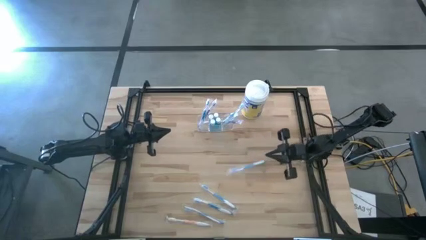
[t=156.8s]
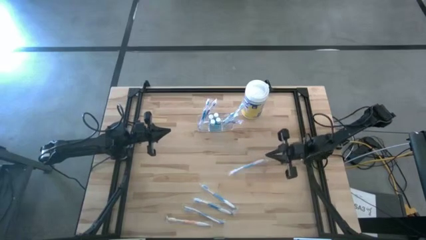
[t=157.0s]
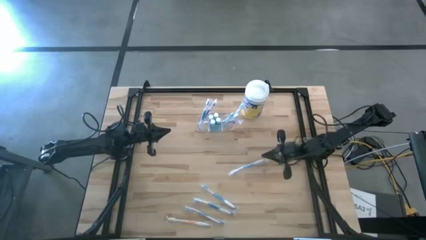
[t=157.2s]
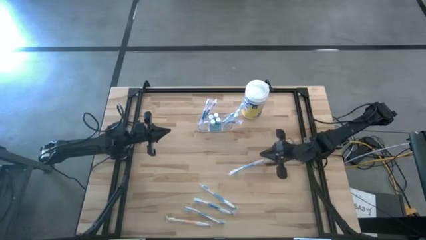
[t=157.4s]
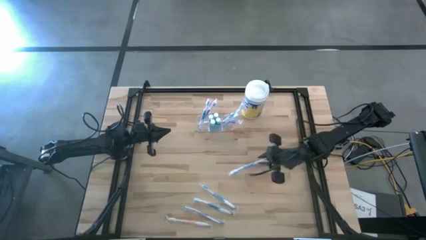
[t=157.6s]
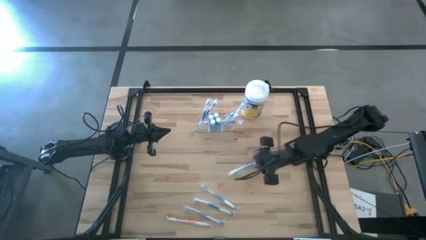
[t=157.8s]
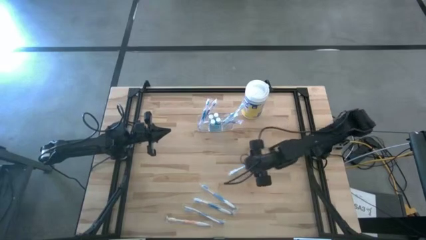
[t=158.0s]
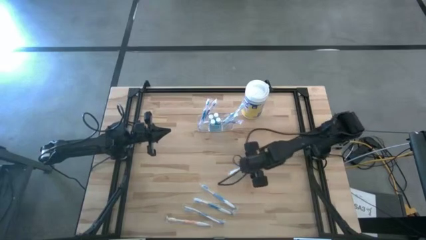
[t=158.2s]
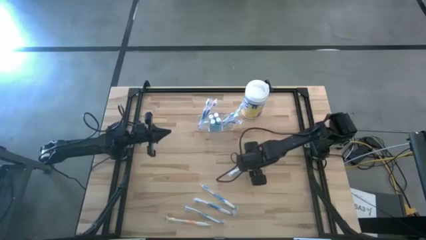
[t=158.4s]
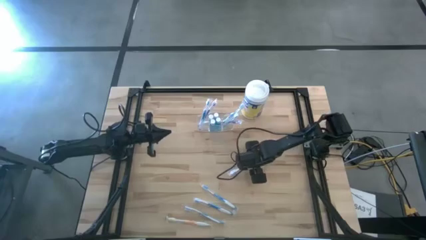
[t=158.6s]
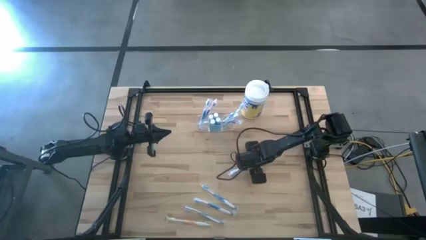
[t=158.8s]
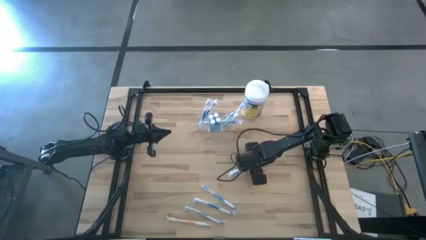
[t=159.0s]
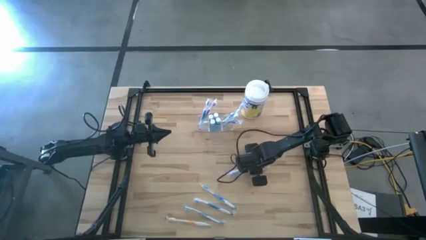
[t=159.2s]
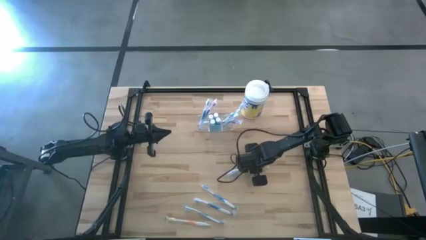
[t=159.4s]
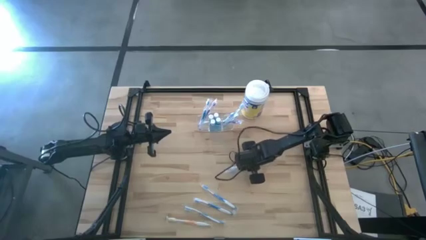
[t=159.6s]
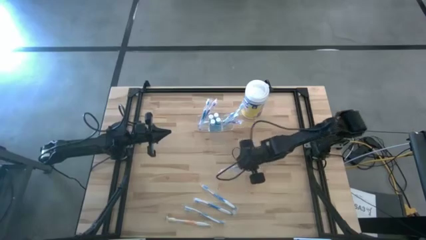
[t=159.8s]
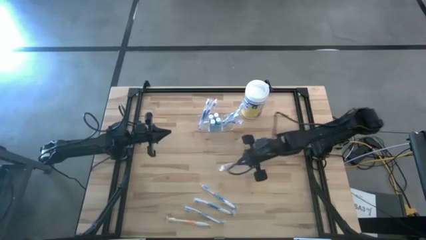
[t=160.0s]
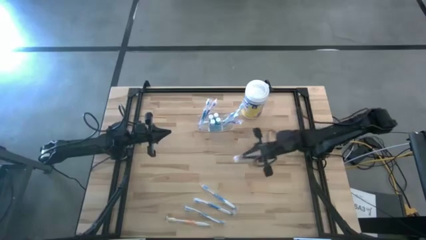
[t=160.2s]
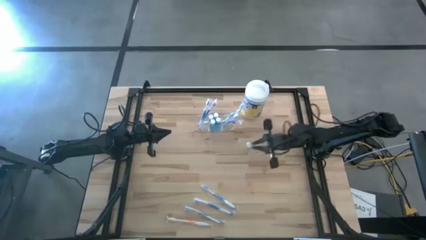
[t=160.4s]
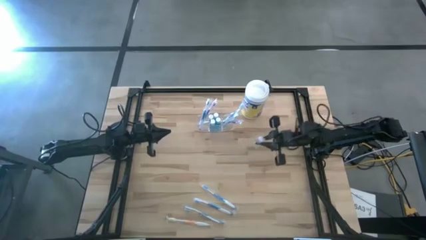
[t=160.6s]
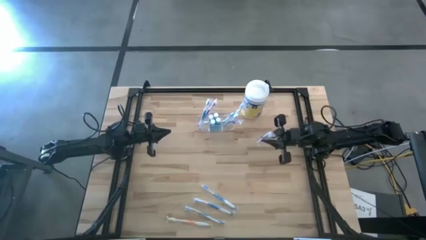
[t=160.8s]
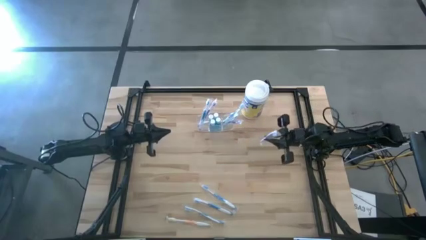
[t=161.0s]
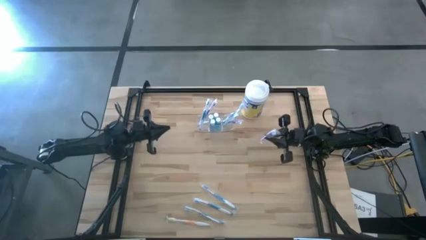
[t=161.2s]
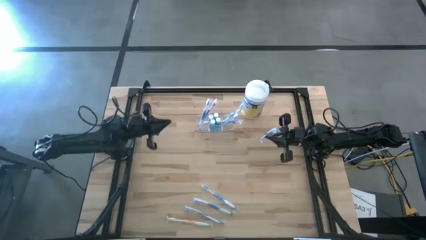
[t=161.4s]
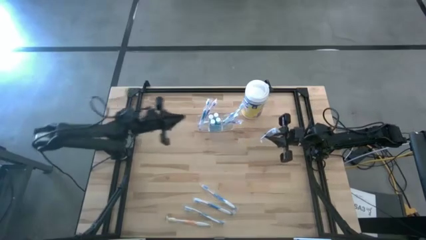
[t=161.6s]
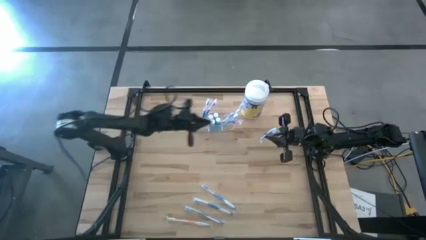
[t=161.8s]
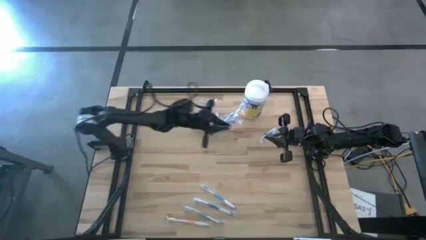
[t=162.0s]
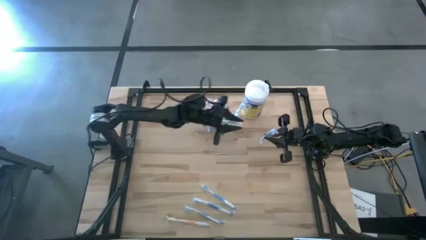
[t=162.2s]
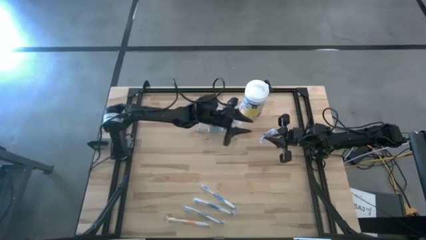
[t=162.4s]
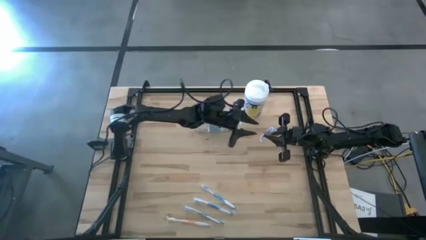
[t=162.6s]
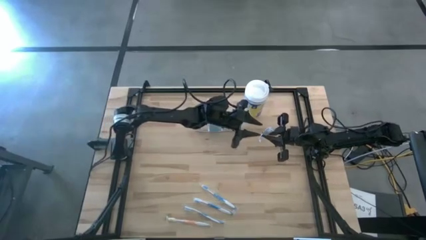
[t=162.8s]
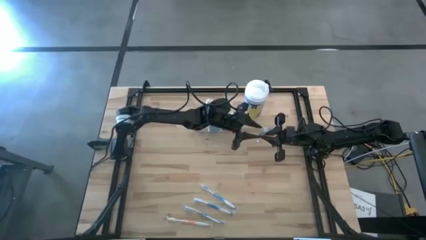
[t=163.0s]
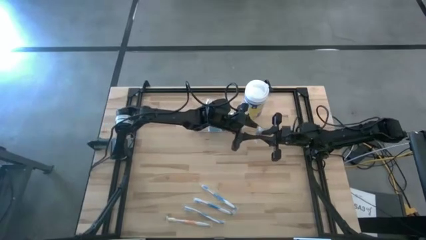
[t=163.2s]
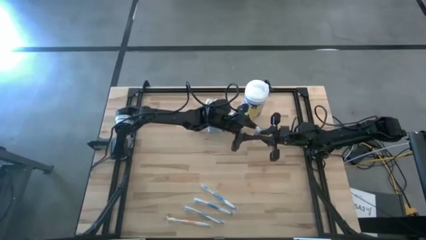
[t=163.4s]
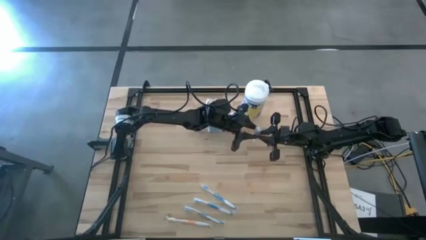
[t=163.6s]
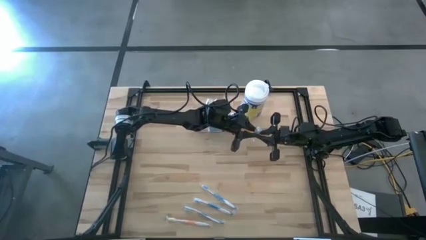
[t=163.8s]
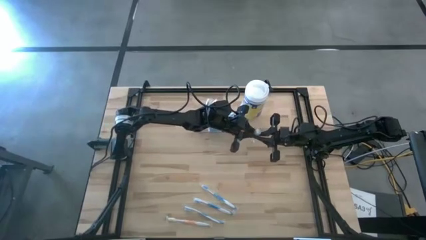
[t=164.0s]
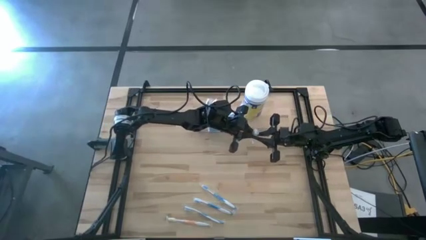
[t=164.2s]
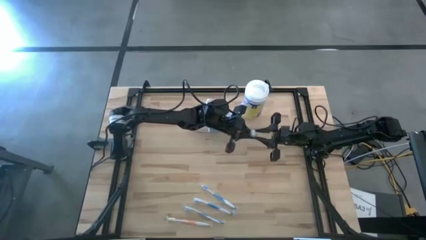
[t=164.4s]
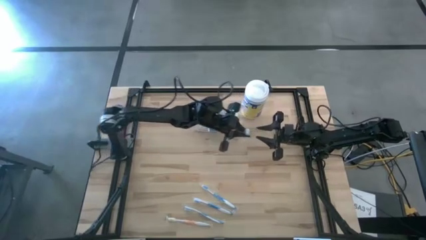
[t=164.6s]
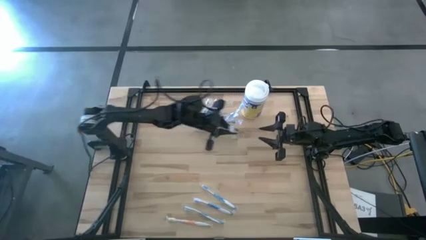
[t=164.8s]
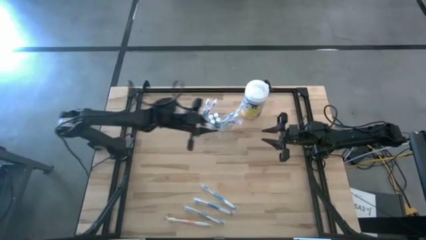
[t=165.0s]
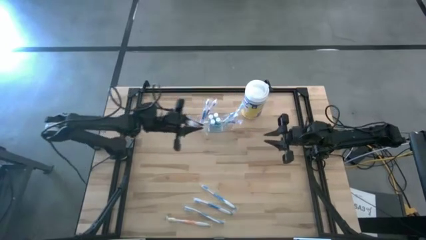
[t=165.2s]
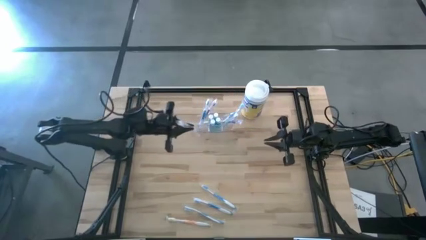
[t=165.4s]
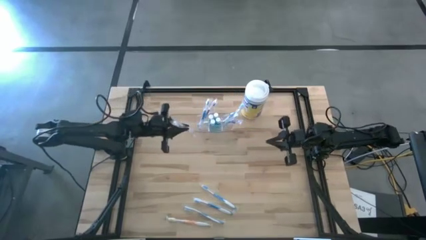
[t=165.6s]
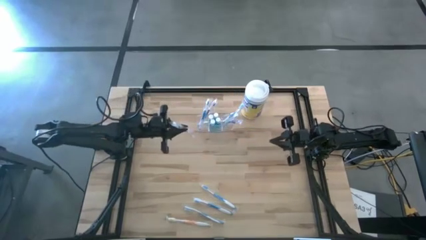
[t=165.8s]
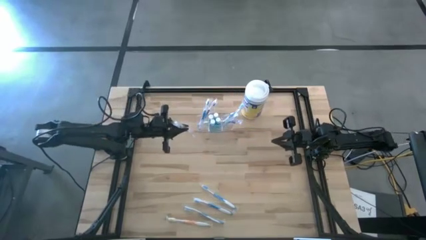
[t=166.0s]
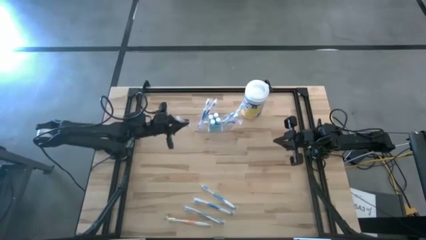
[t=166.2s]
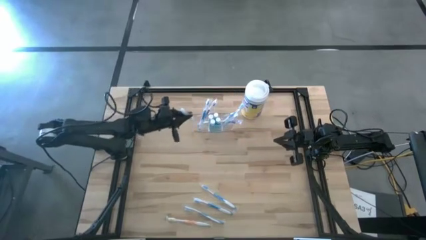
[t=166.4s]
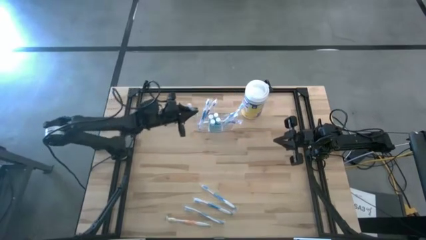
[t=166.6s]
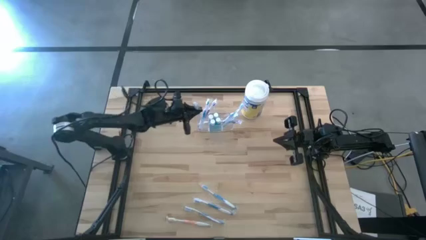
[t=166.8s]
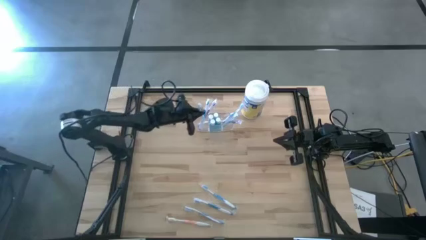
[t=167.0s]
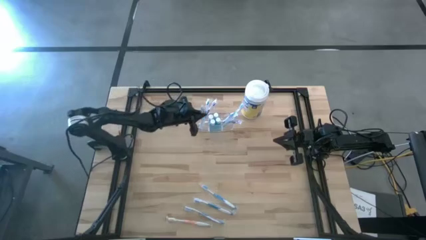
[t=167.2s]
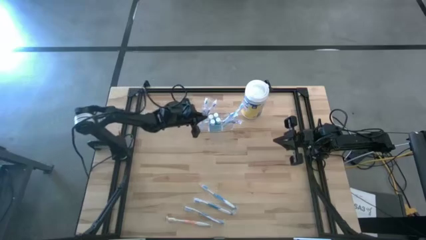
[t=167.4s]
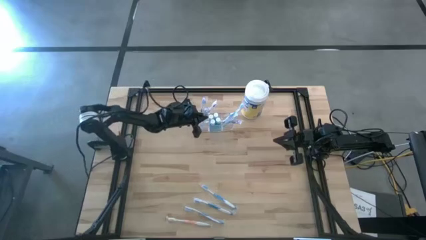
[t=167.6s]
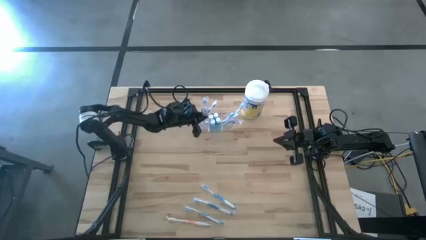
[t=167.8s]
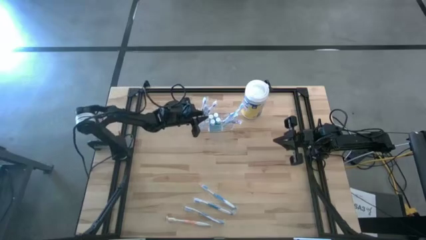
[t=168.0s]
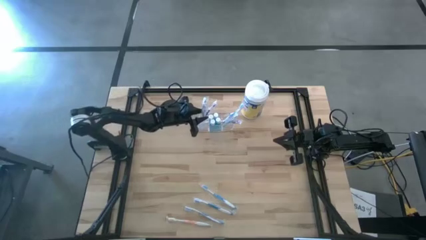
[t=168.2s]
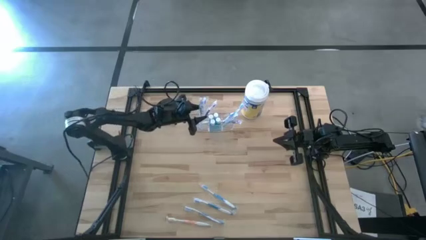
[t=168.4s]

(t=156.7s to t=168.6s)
Task: Pick & Place toothbrushing station
Put the blue toothbrush into the left section of the transparent organizer

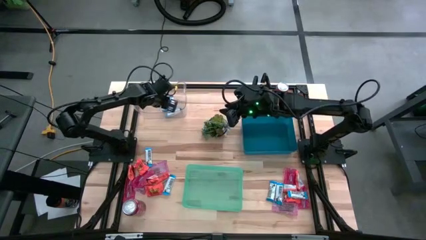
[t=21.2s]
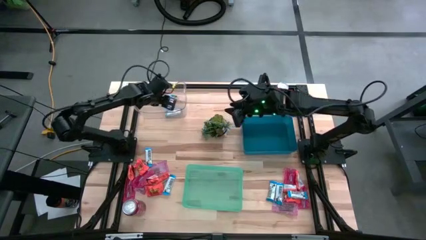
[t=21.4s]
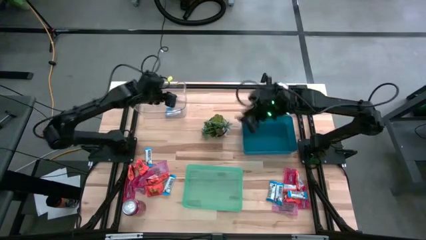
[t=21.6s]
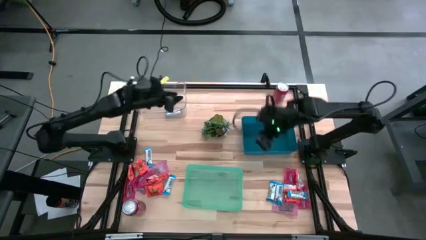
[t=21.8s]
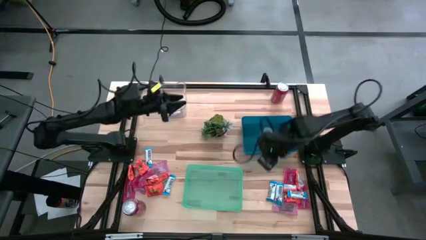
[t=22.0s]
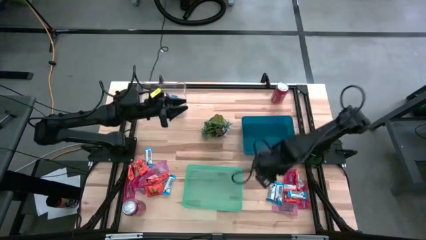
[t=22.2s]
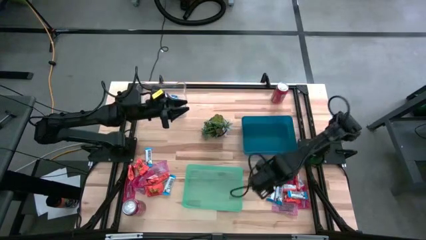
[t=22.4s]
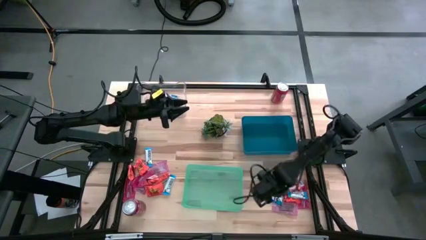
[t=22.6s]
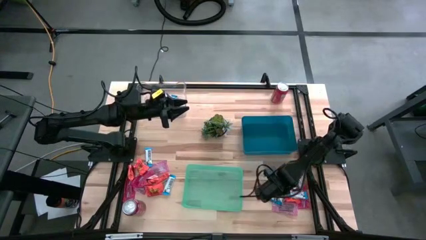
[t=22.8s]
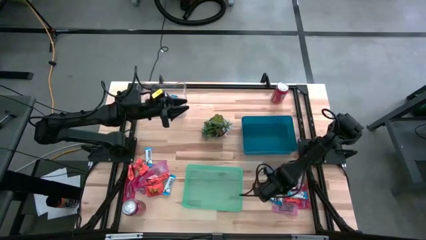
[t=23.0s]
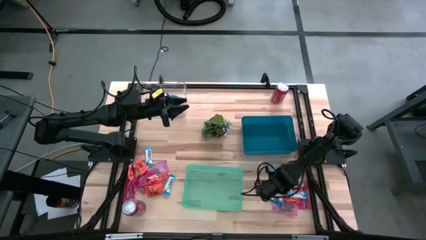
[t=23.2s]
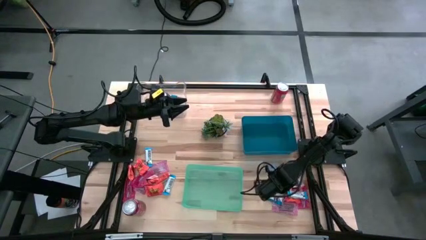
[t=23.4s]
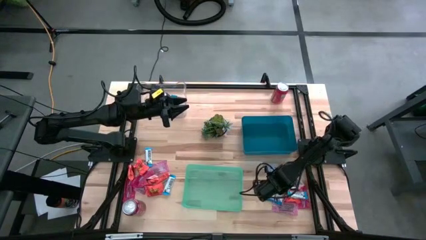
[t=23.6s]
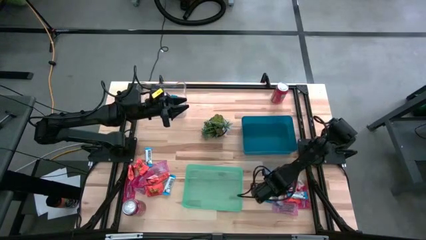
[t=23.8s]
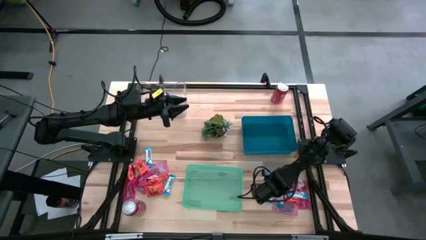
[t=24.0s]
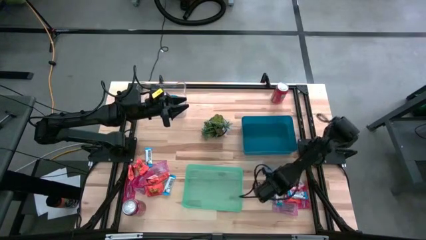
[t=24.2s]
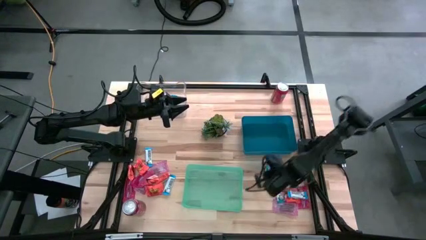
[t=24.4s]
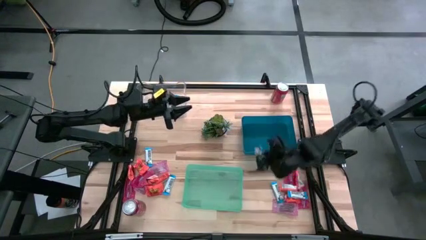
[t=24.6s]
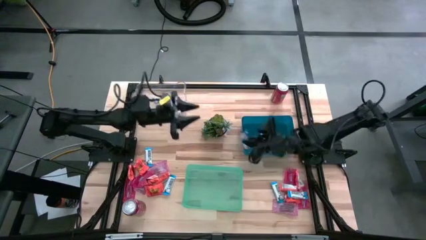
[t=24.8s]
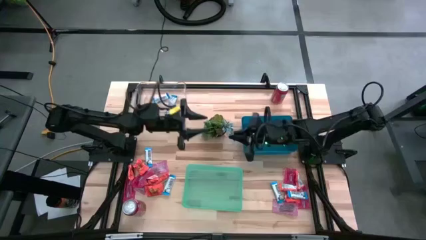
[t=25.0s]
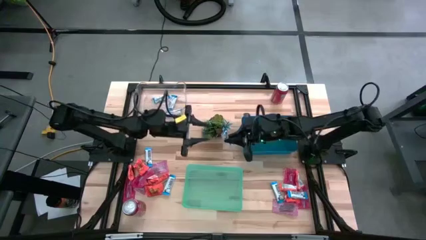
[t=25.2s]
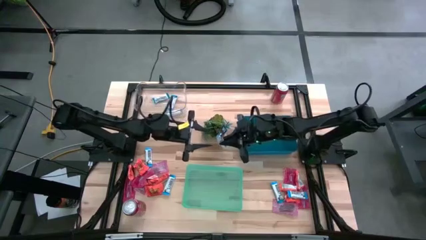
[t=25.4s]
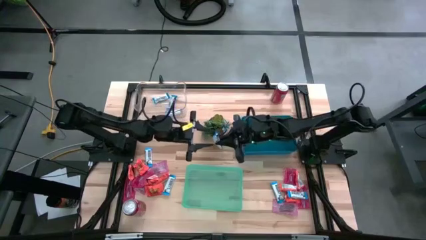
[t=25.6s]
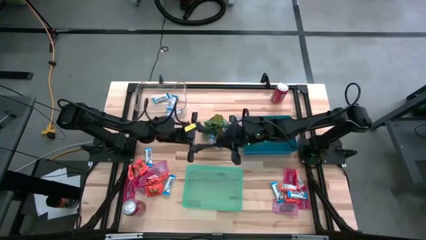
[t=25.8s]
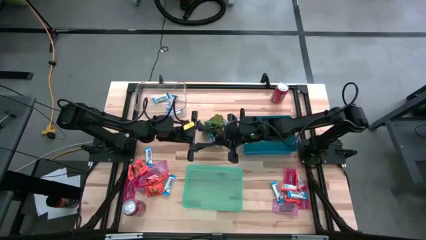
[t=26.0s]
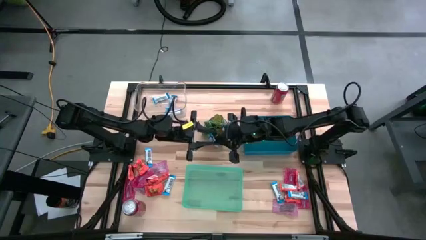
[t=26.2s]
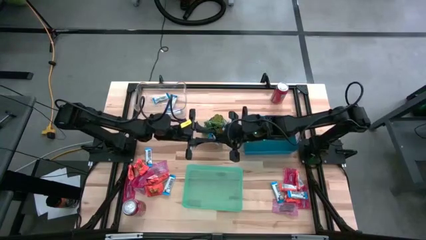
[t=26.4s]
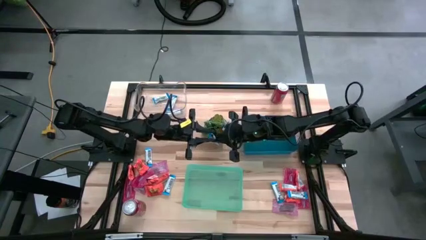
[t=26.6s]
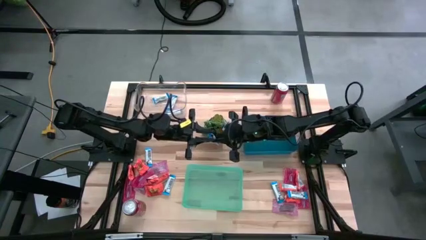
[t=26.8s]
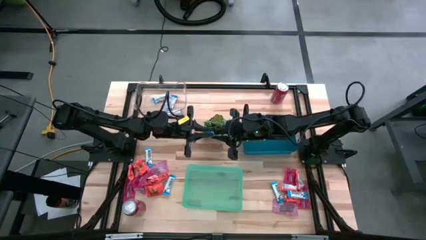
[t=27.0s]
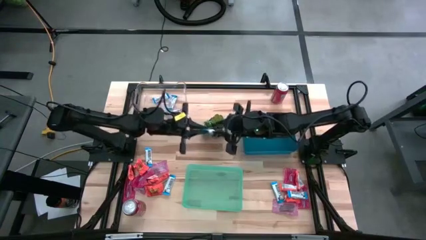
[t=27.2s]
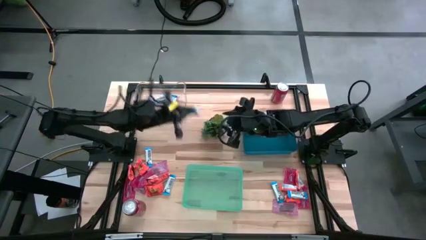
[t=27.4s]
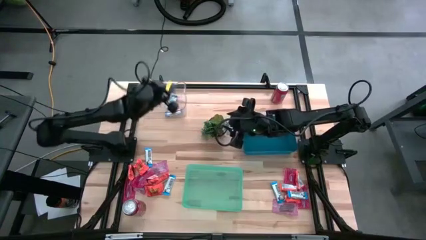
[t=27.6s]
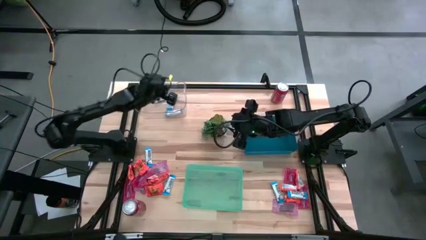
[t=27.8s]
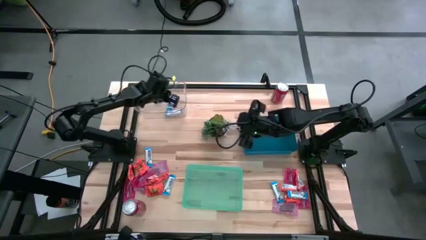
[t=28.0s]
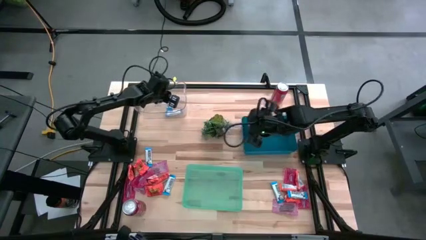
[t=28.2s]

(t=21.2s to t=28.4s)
Task: Sort candy
Put the white chocolate bar into the transparent bin
